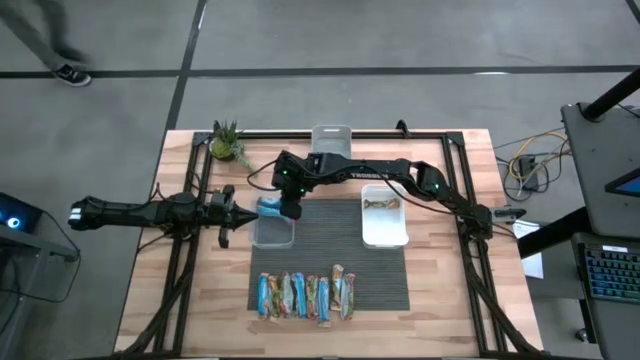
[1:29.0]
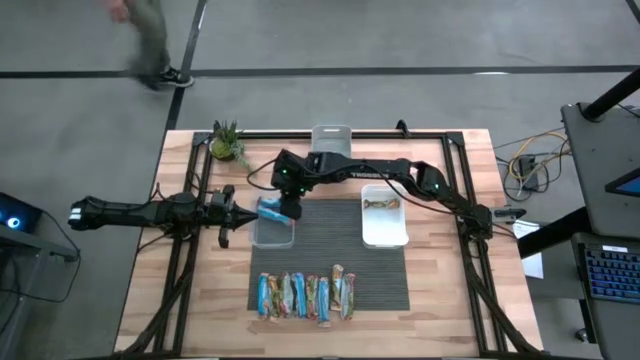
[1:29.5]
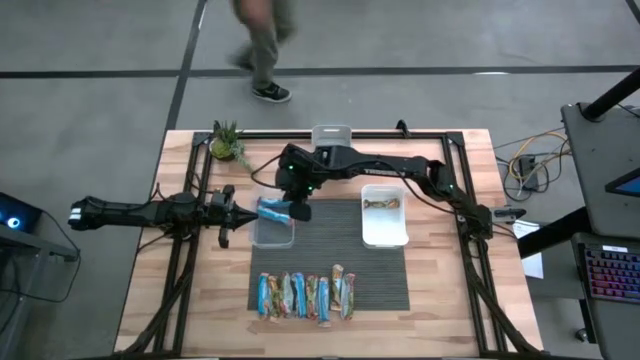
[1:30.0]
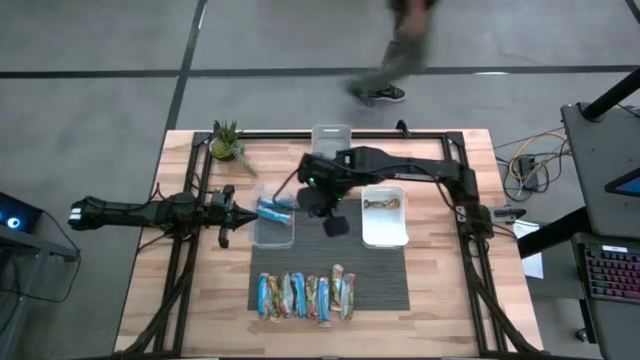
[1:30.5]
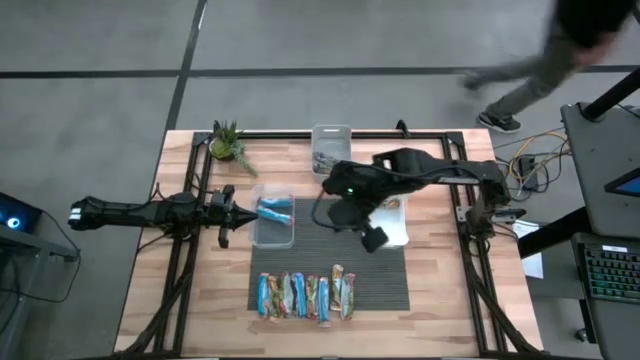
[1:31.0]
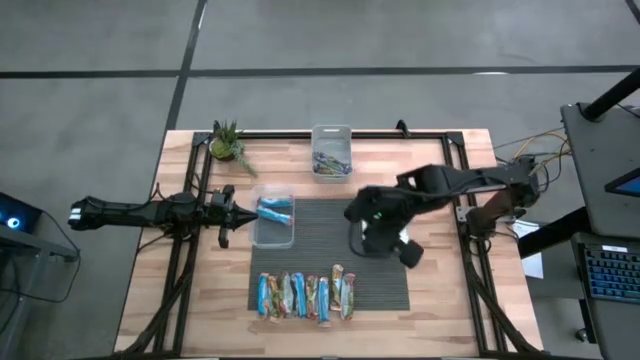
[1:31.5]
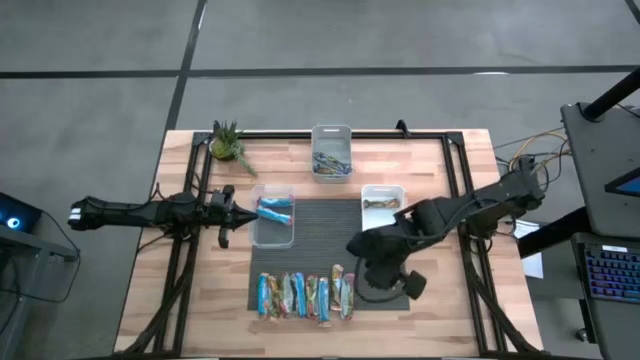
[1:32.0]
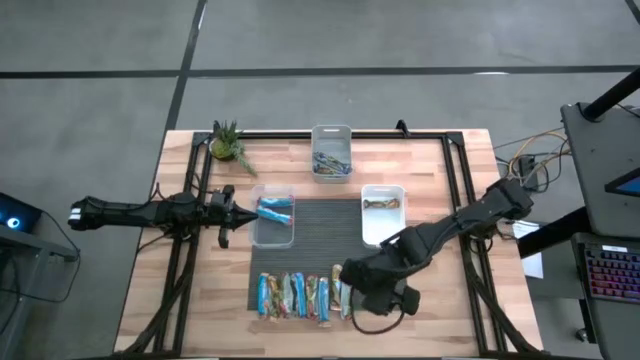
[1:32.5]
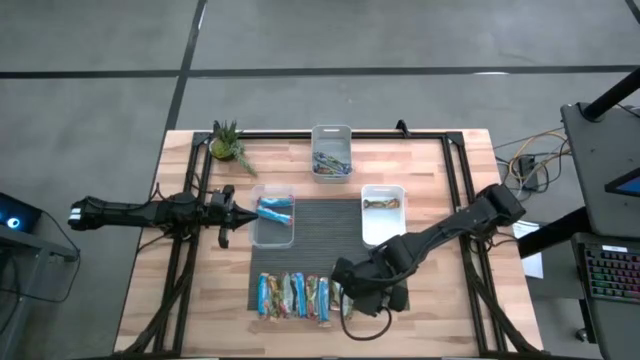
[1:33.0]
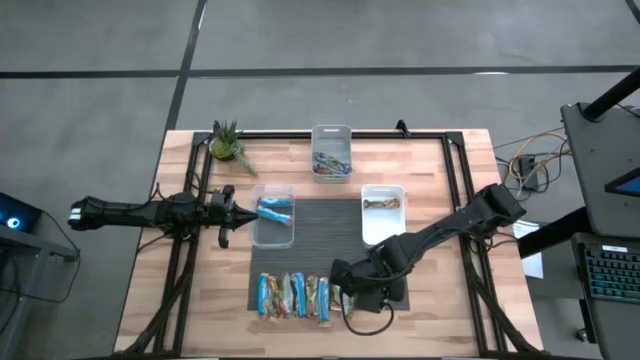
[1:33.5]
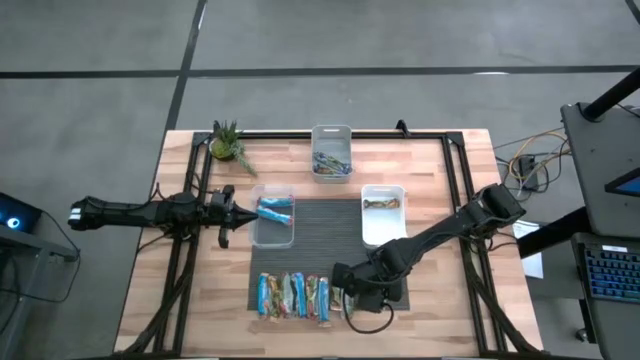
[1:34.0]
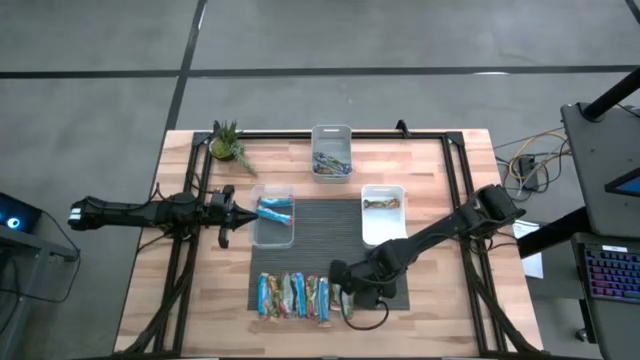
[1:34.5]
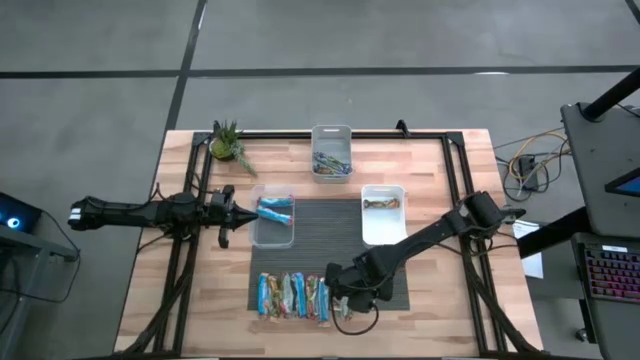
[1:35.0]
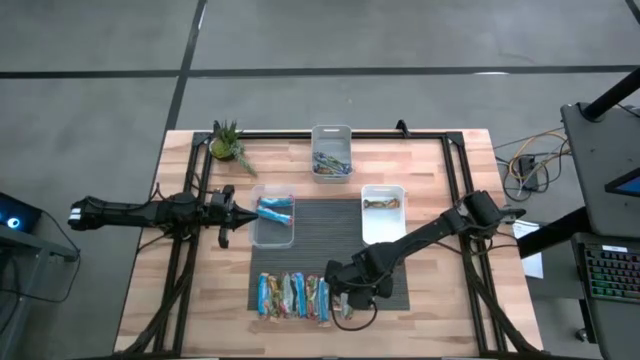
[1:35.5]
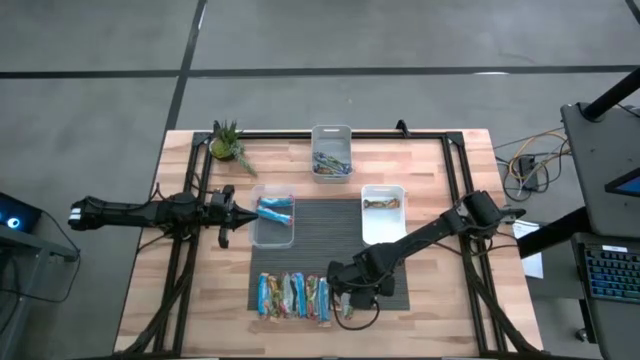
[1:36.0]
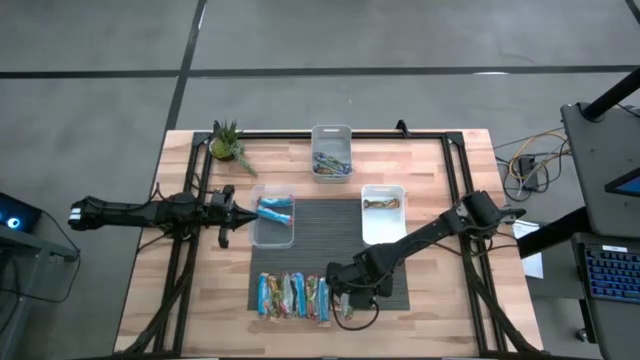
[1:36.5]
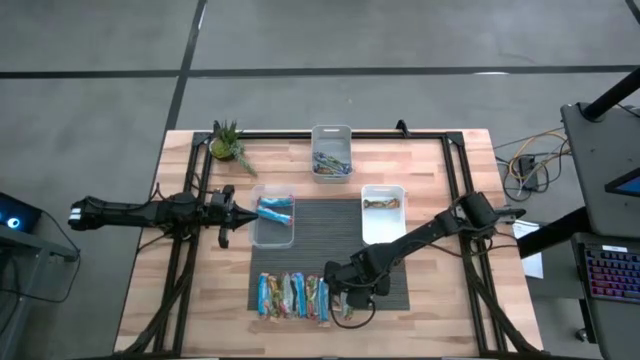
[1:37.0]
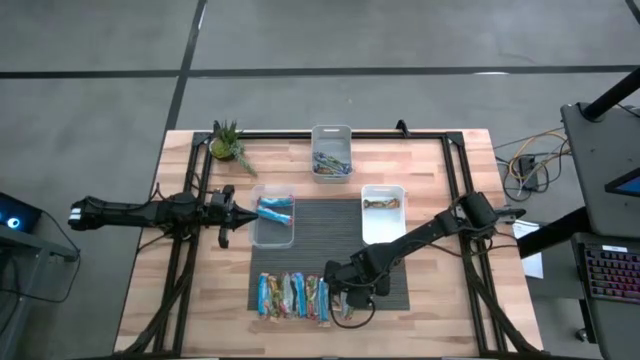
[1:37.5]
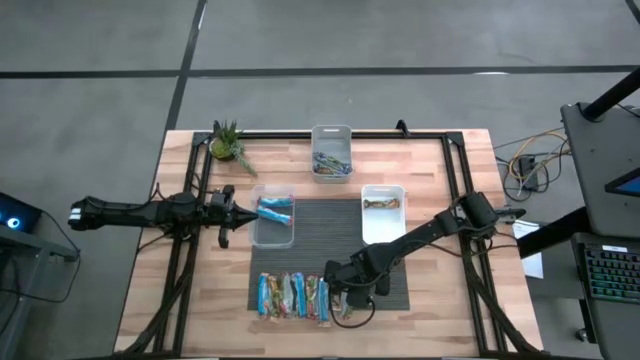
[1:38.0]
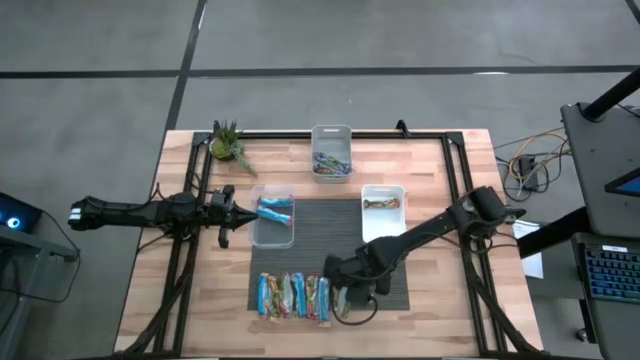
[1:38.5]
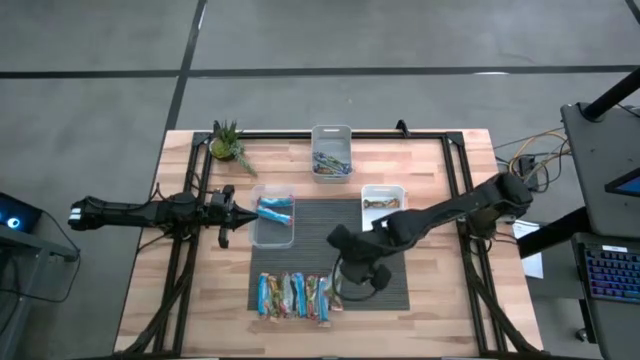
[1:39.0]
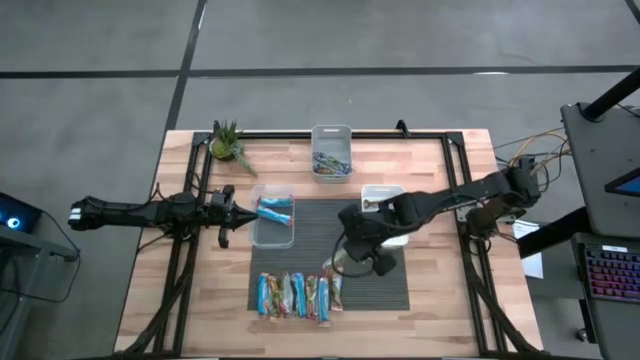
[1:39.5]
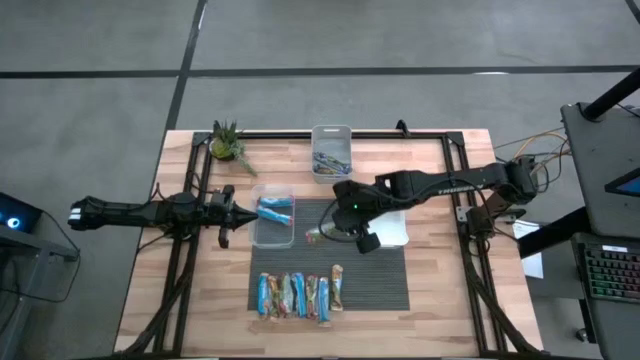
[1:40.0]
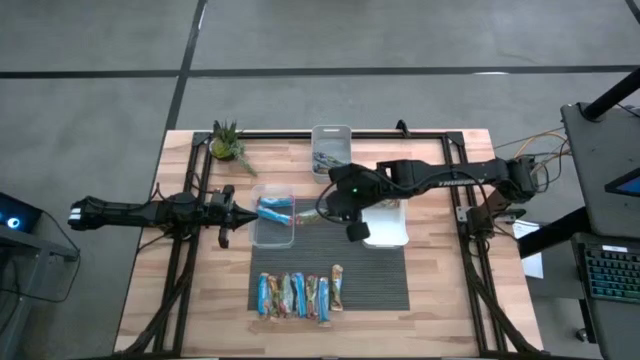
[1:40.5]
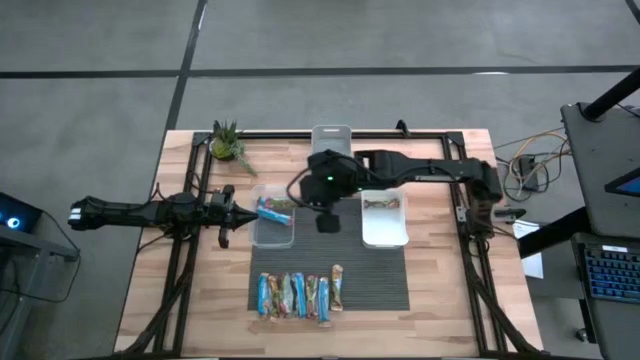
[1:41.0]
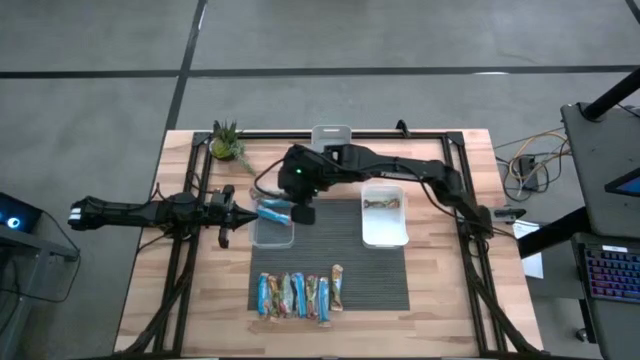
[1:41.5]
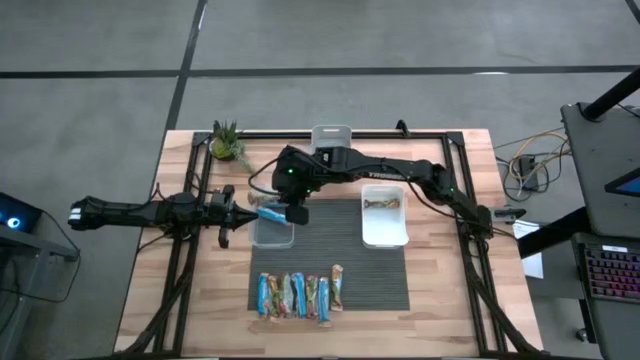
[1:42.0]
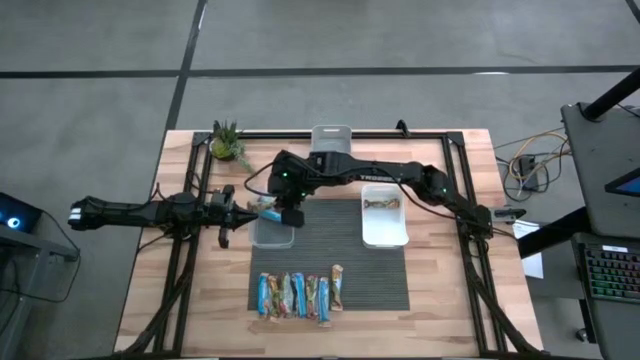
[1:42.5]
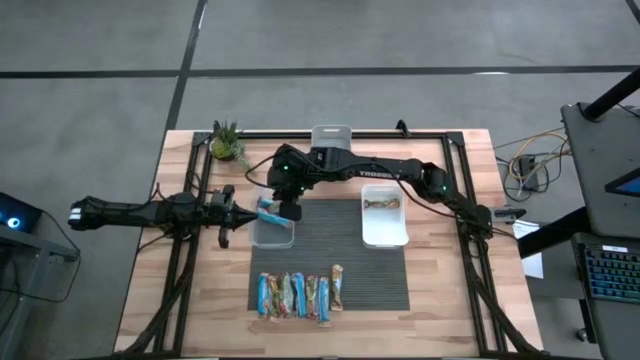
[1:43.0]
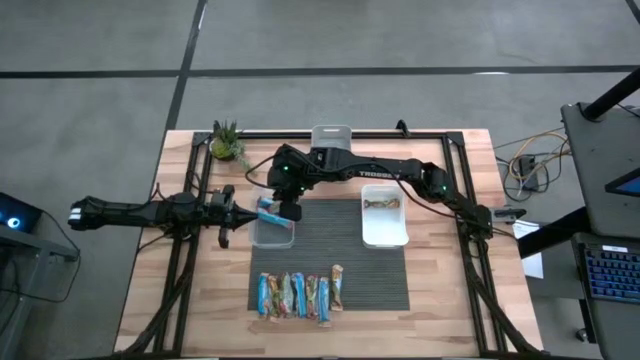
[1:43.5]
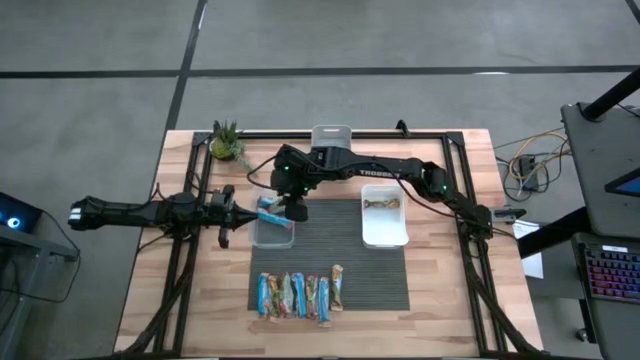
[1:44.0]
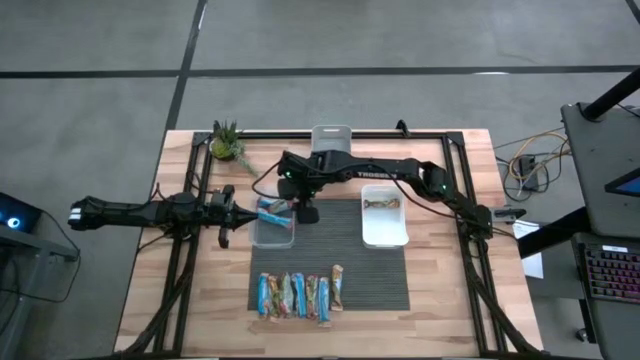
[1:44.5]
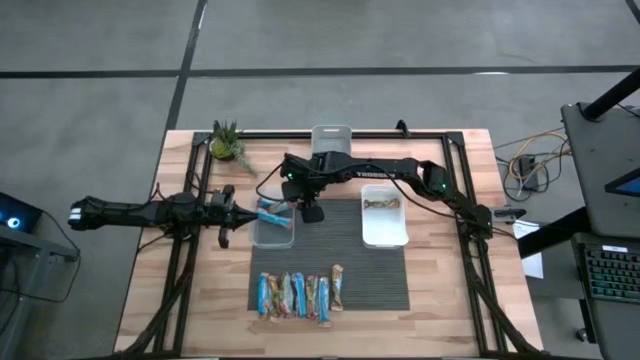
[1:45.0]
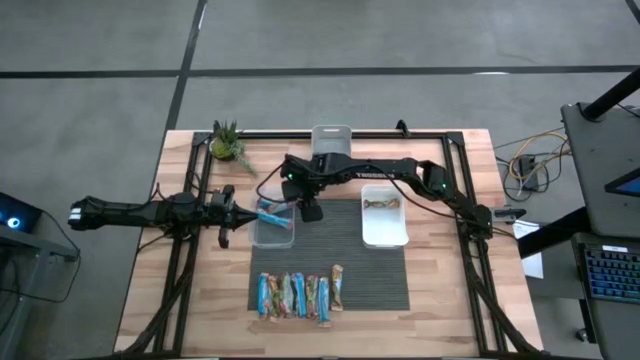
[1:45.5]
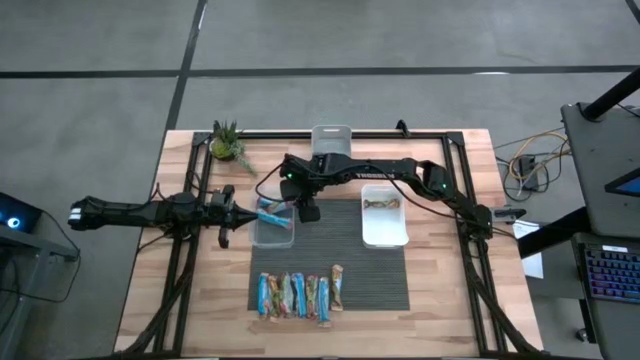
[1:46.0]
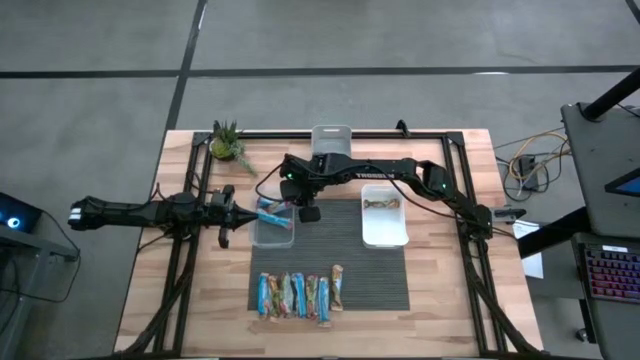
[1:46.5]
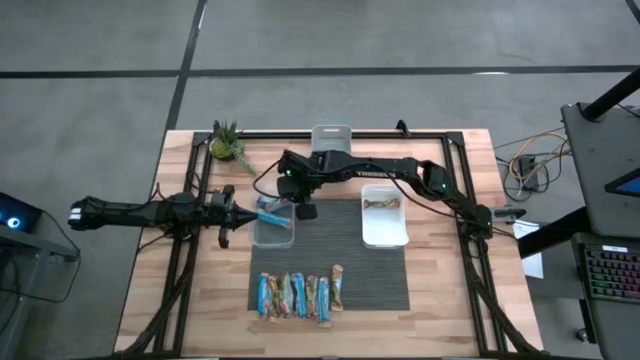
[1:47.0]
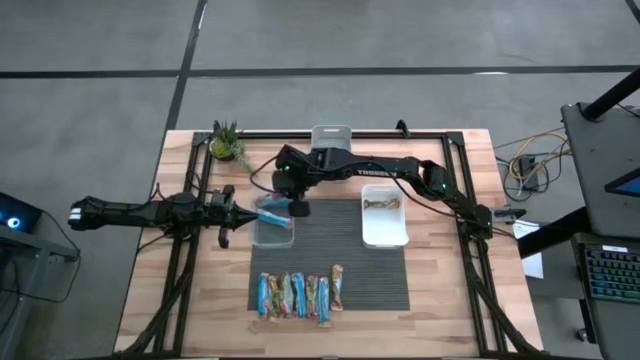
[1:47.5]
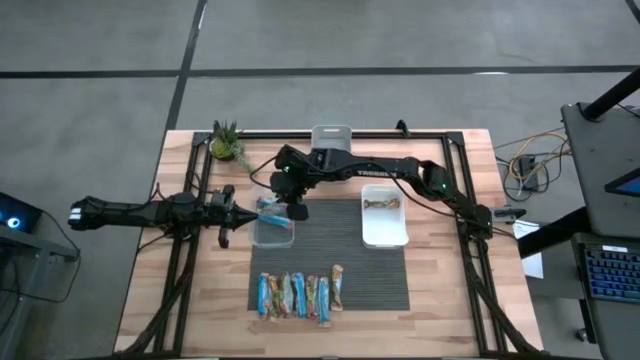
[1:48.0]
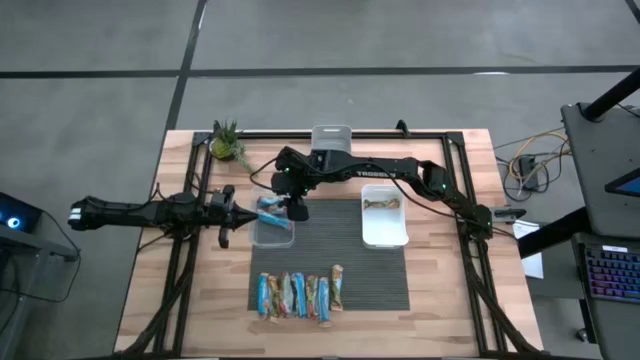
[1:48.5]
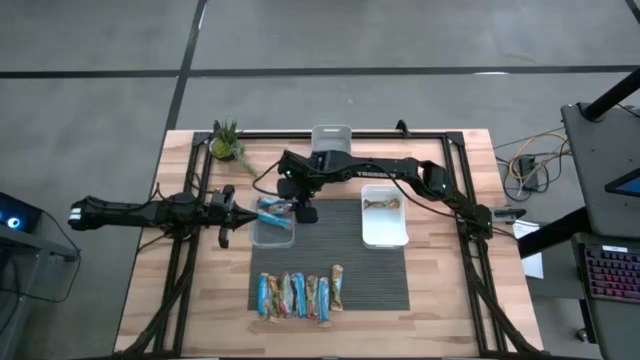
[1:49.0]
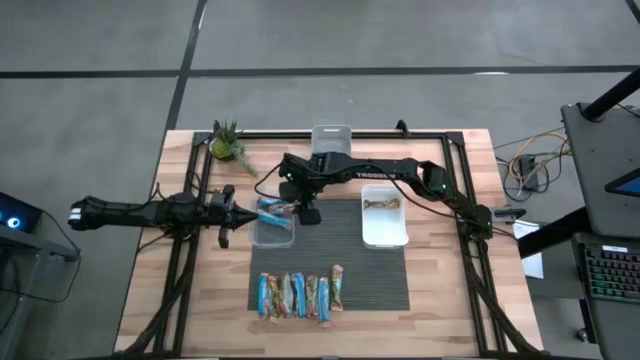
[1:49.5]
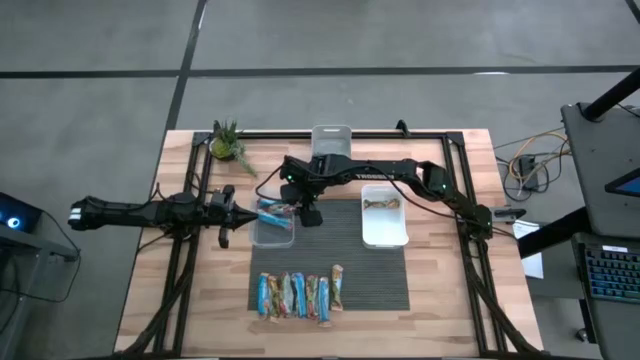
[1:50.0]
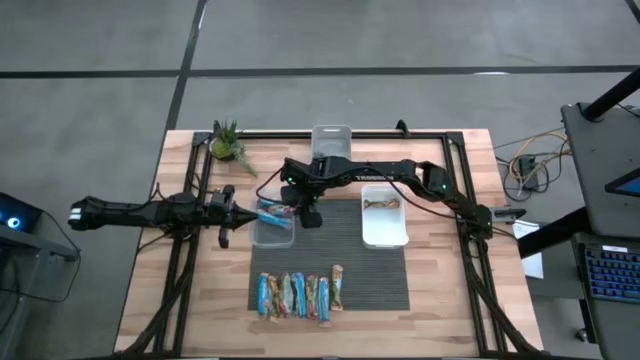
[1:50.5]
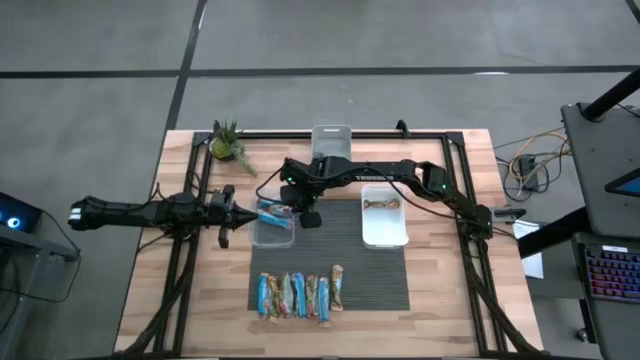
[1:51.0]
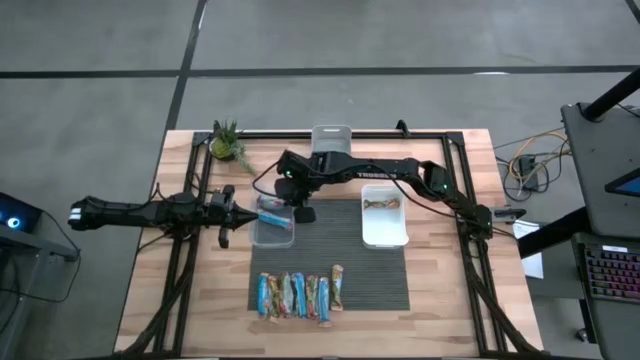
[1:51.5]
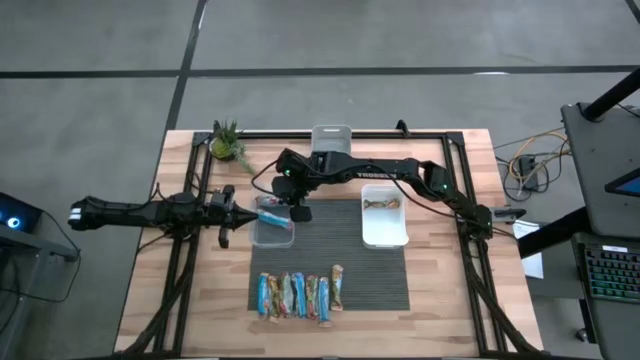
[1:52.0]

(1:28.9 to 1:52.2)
Task: Pick and place Granola Bars by type
Put the red granola bar into the transparent bin
